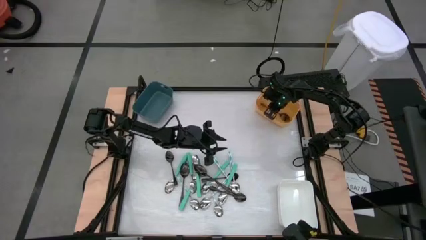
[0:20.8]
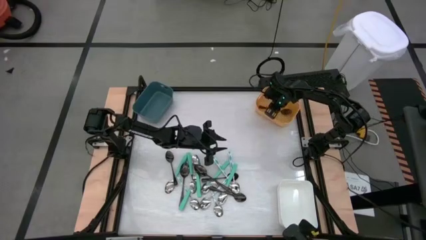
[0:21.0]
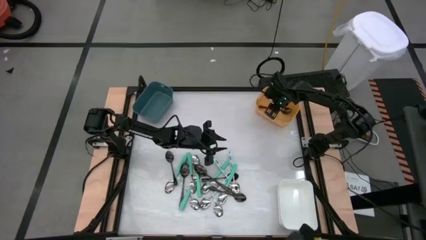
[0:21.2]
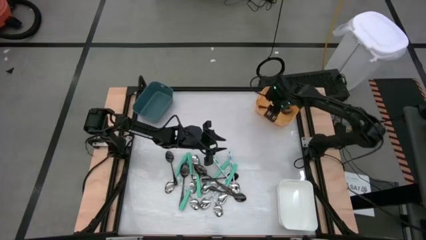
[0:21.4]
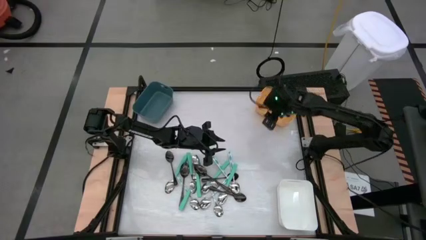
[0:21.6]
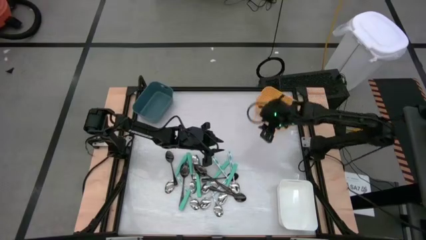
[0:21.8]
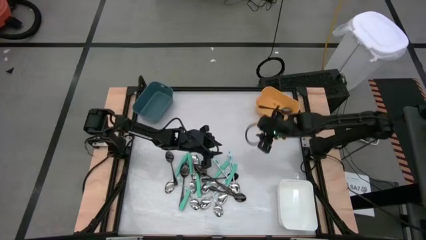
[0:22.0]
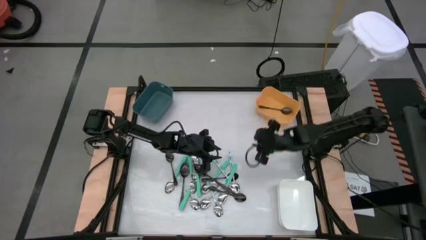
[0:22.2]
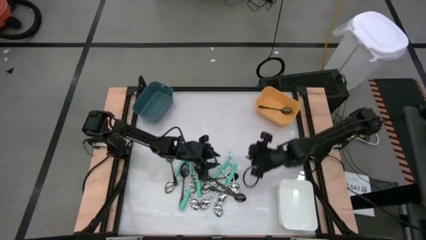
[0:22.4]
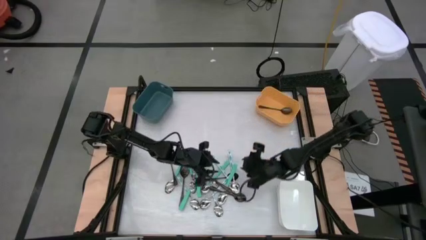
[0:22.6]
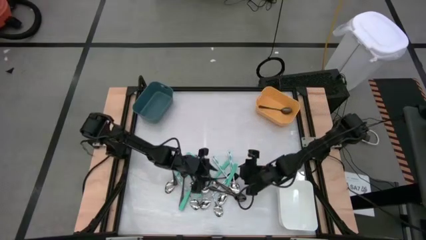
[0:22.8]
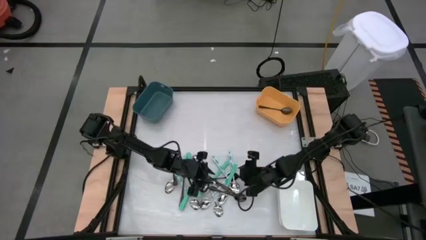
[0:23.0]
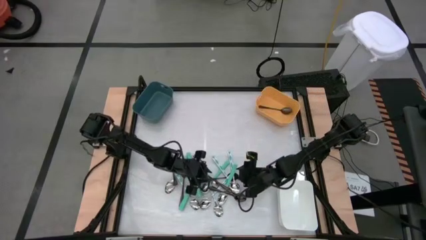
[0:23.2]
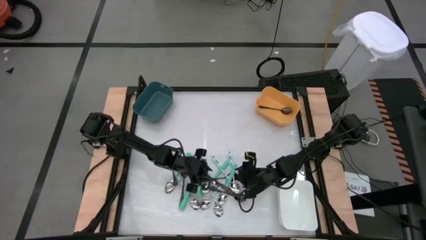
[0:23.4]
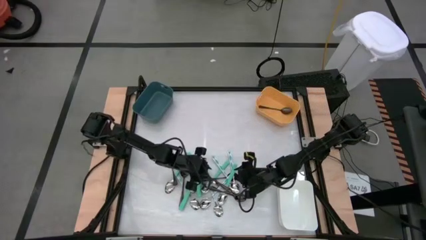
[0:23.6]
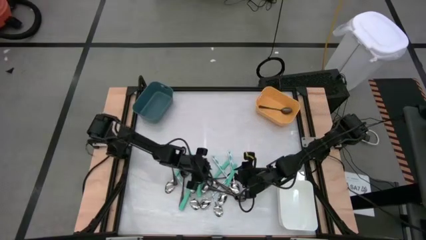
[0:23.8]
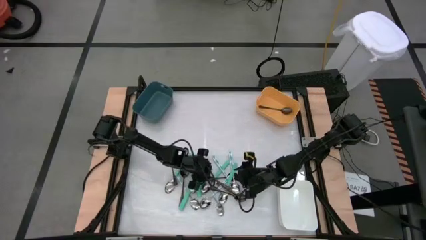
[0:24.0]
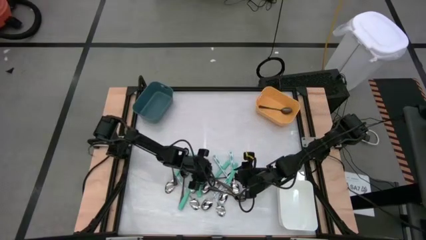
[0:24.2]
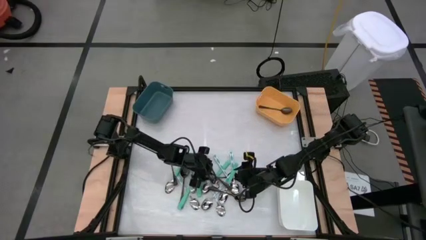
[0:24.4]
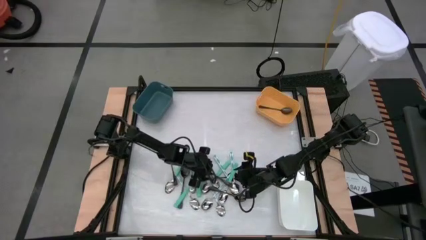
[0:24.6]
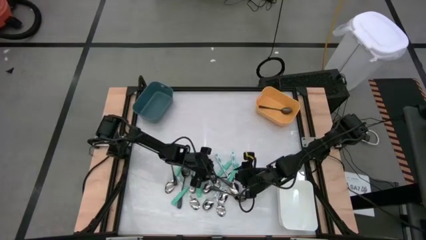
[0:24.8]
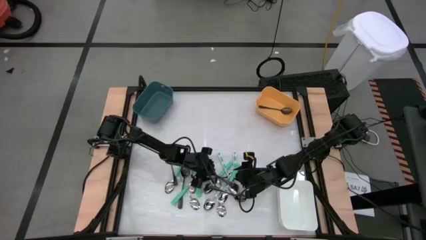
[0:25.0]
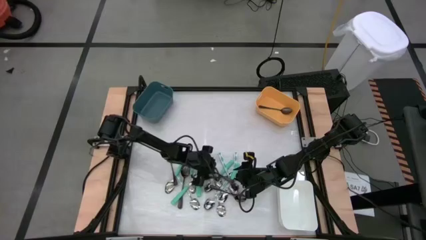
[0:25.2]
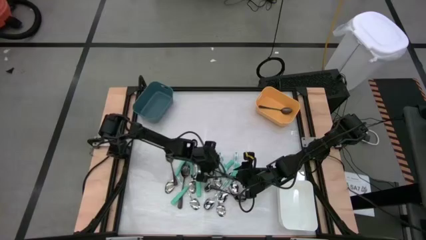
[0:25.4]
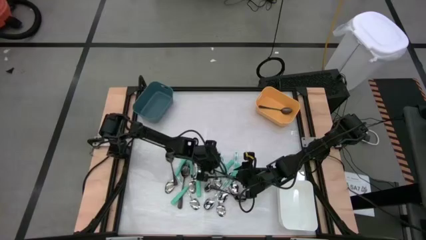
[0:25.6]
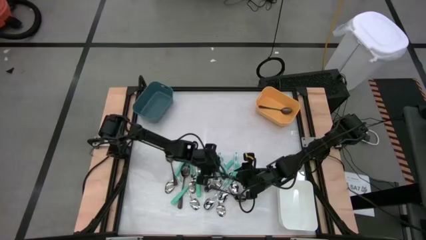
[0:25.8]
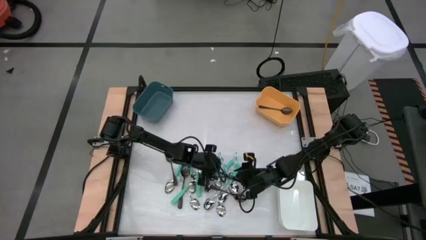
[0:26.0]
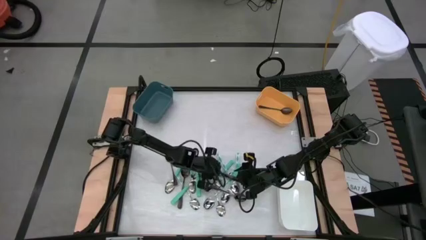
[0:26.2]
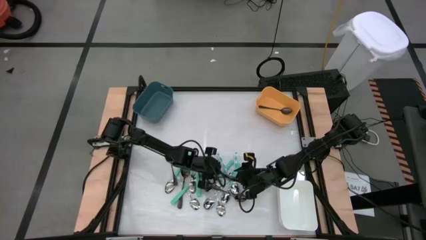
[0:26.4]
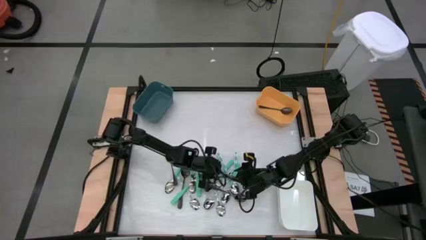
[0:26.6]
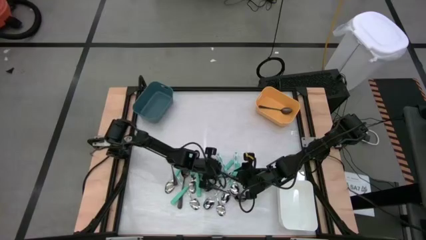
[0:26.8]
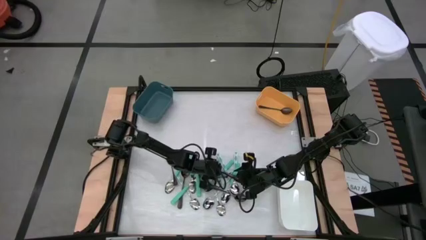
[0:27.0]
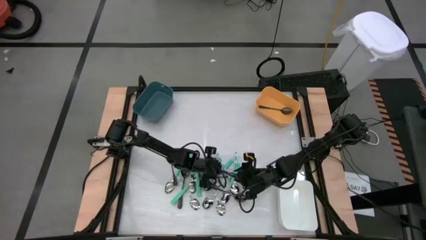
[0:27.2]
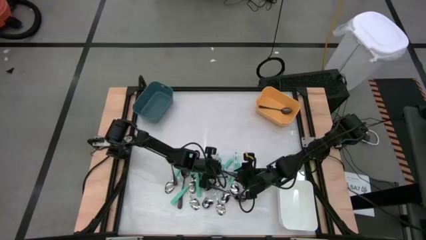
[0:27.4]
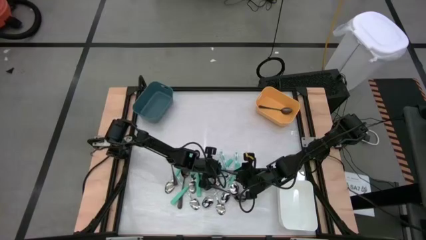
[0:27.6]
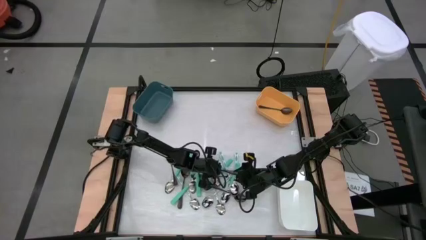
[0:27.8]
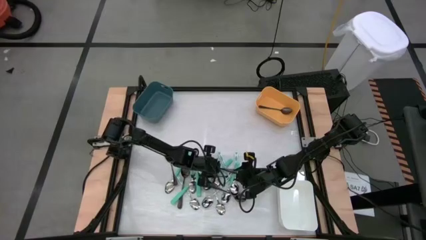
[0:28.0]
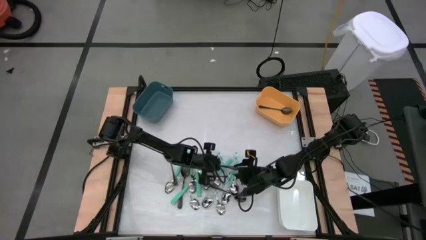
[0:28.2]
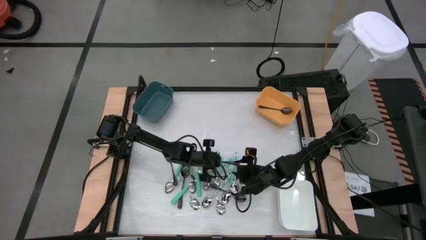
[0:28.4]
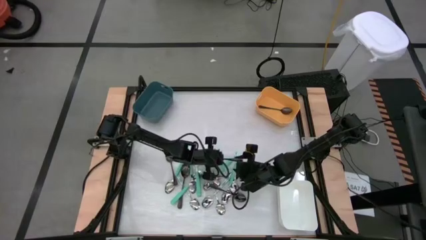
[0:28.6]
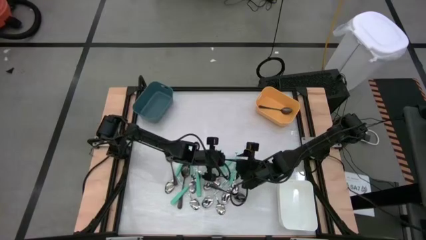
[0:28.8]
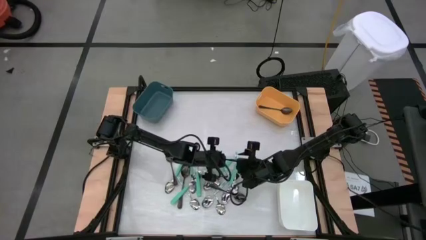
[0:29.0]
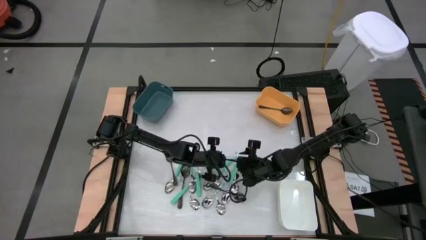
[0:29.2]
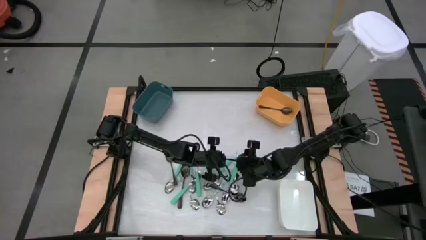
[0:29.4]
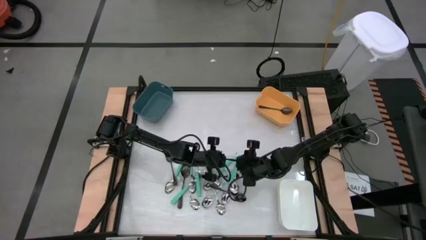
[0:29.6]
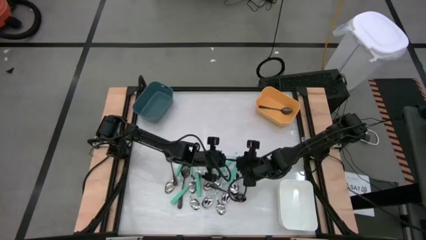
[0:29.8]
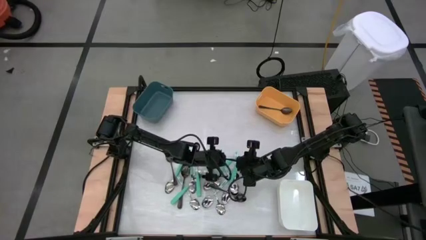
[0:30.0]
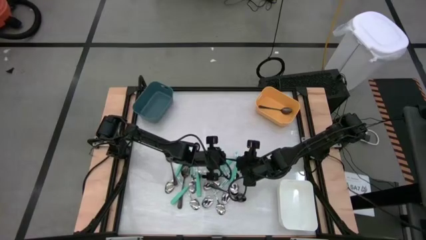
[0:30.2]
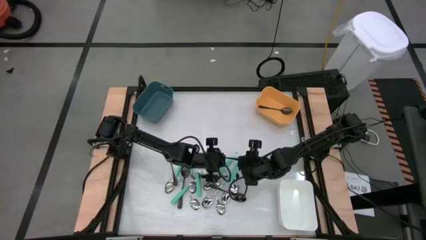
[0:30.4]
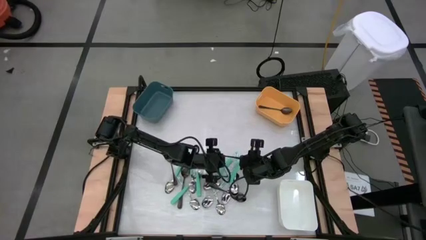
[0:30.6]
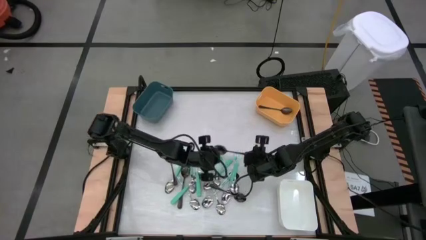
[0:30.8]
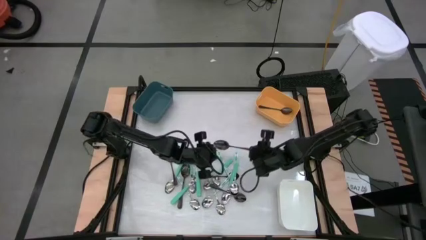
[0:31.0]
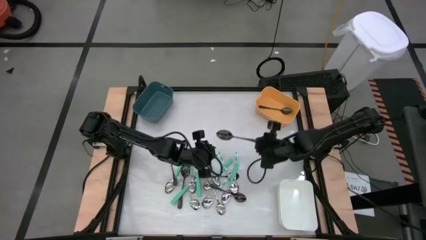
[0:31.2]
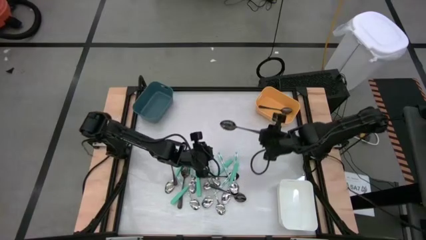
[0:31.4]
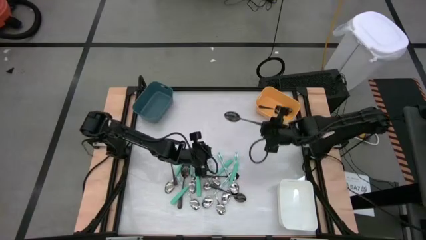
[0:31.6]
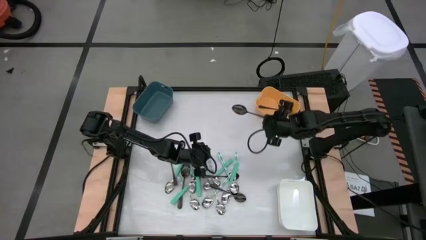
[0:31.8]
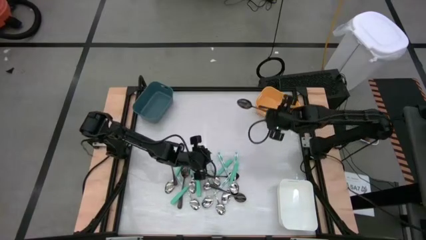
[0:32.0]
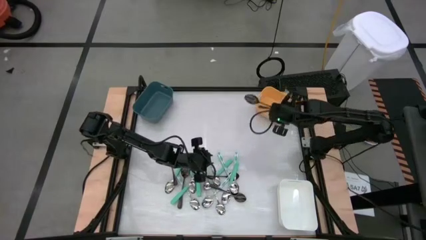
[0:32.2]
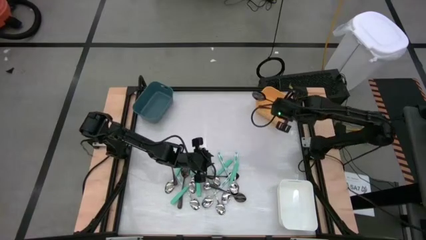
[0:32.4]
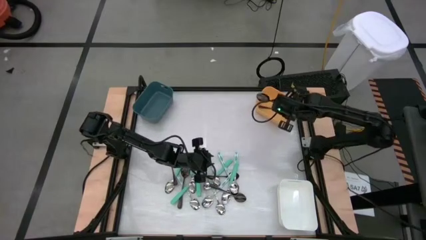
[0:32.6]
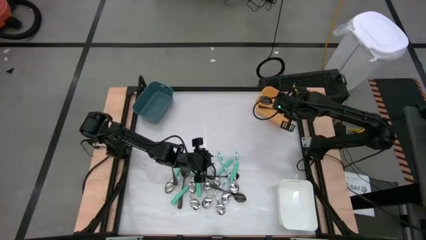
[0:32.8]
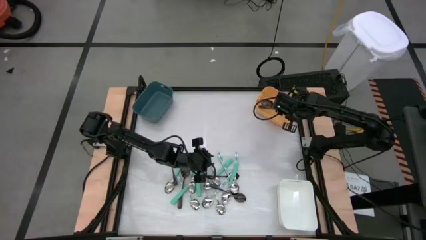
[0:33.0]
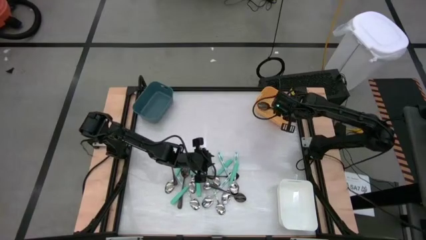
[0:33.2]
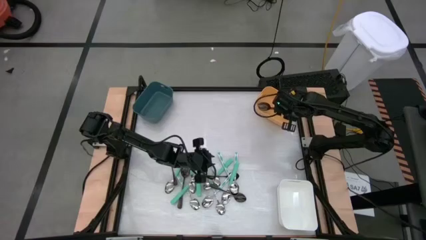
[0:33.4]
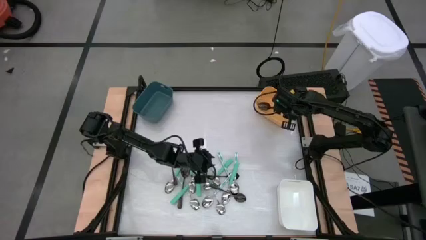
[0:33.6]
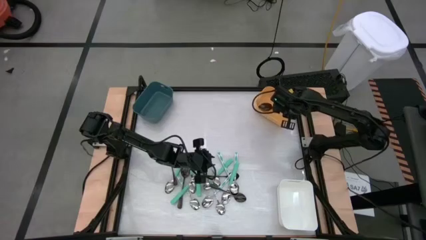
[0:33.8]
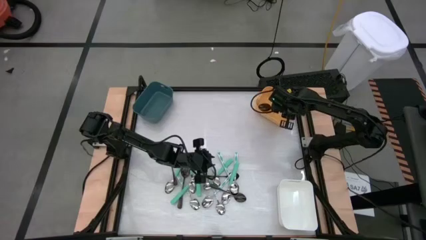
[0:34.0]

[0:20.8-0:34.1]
Task: Sort silverware by color (type)
Put the black spoon into the yellow bin

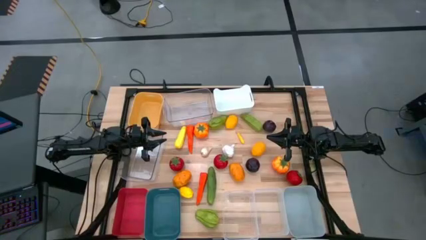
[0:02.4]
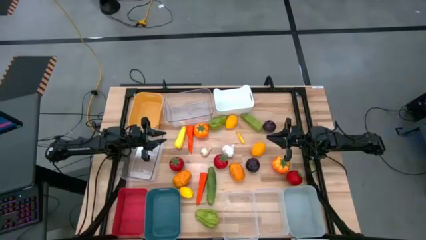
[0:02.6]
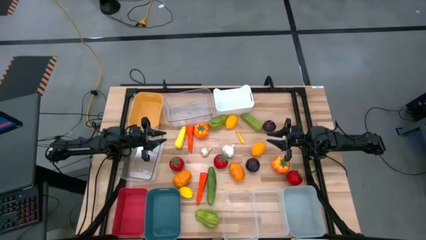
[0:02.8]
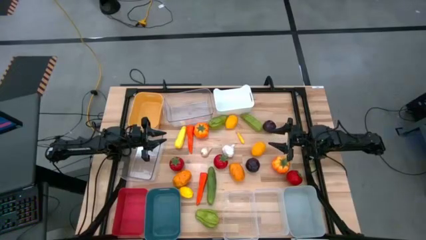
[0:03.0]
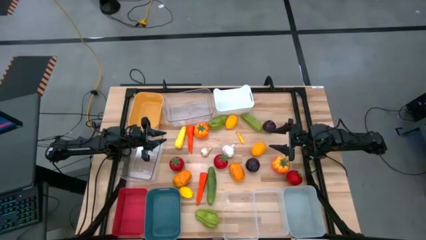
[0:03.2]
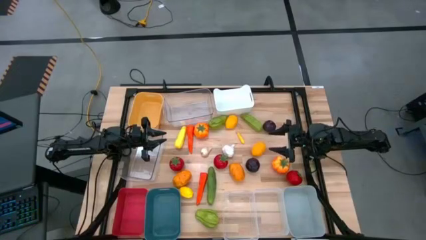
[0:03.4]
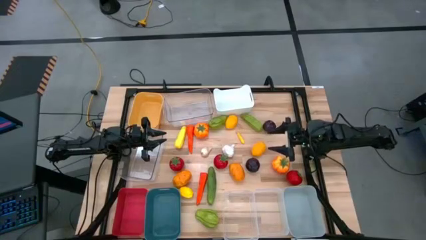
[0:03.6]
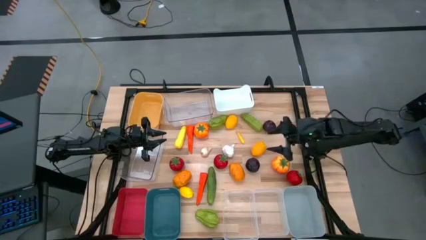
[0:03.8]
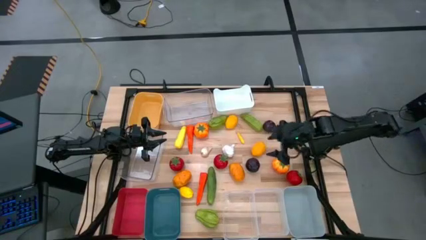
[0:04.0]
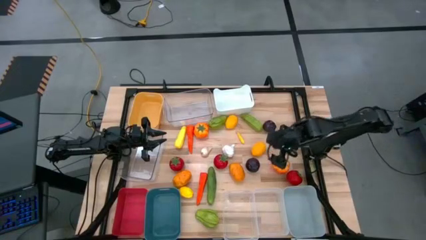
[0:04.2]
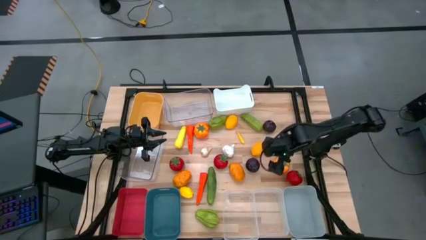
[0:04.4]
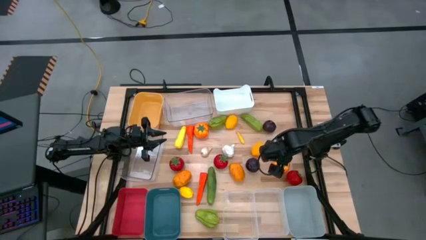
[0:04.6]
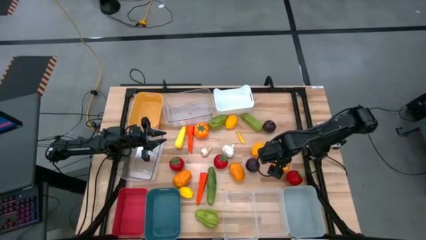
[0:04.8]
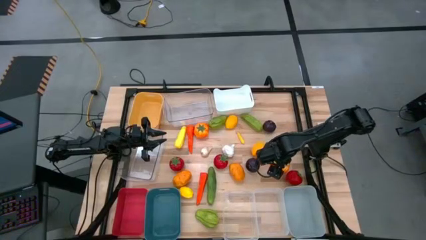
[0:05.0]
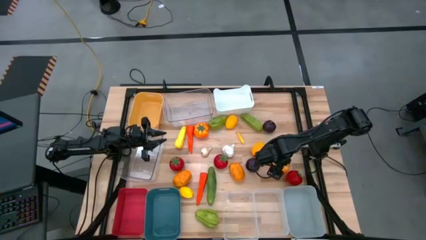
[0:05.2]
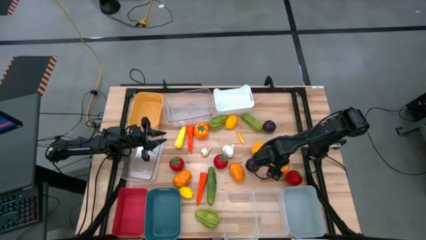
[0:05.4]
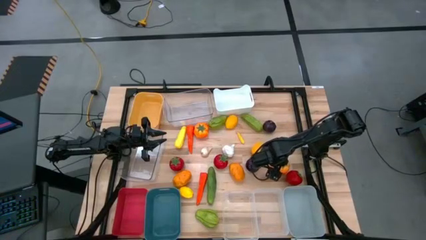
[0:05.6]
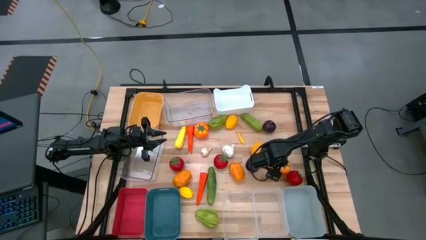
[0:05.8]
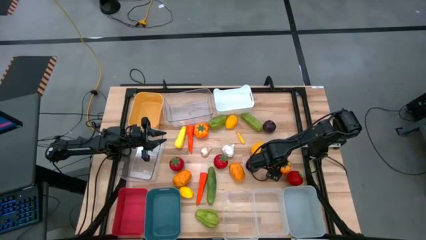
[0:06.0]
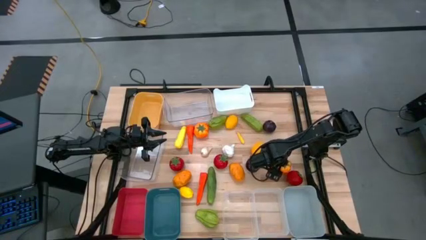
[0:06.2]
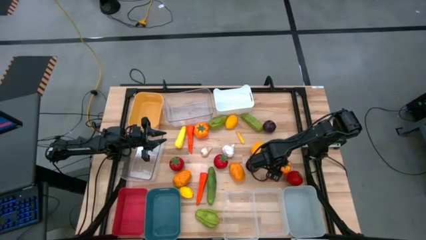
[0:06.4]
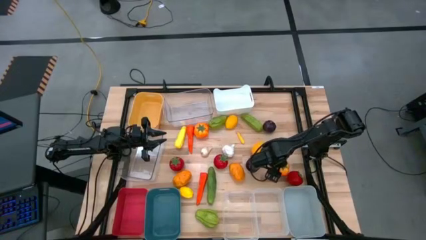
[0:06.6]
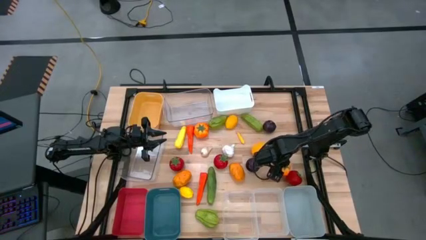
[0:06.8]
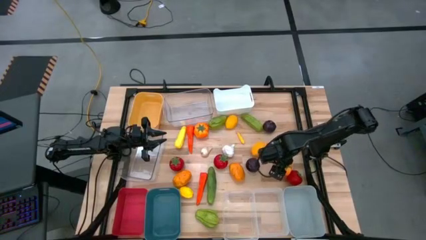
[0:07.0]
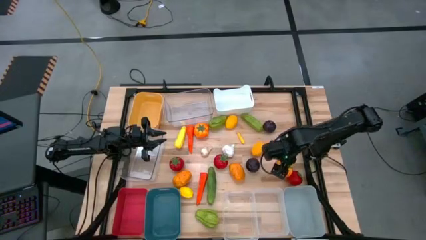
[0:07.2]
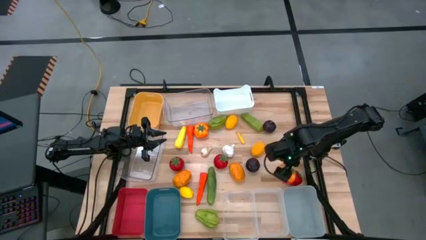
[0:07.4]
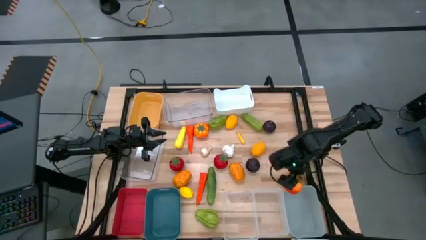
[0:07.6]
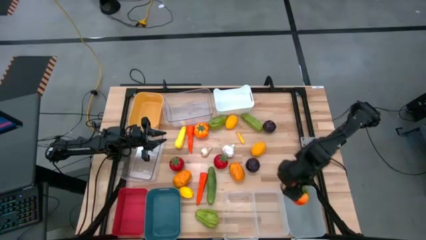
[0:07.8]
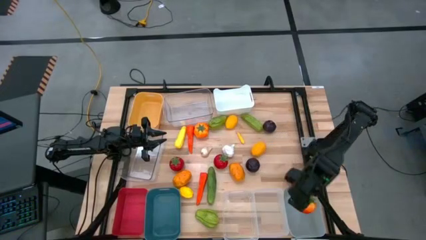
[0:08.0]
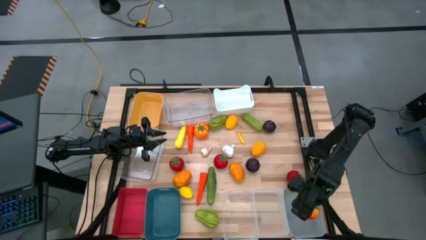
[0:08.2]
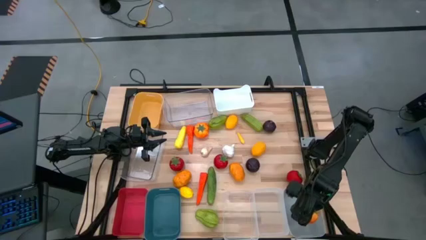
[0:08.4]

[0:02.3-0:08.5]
Task: Sort produce into baskets
Put the bottom orange tomato into the gray bin
